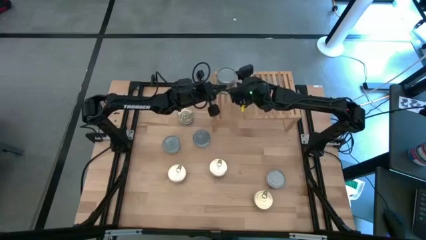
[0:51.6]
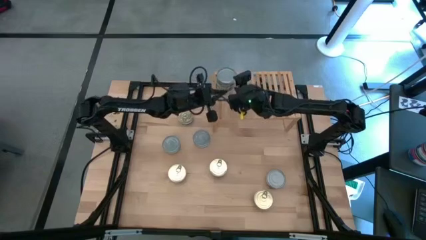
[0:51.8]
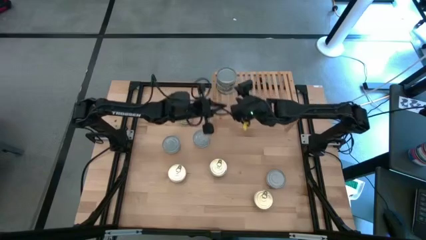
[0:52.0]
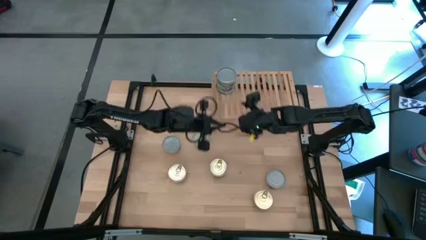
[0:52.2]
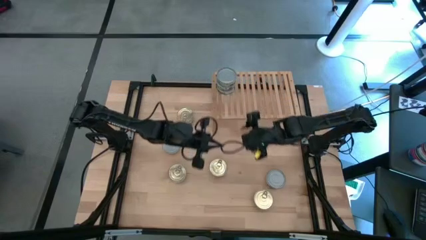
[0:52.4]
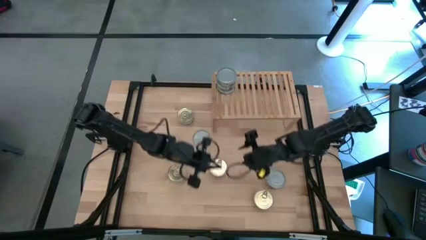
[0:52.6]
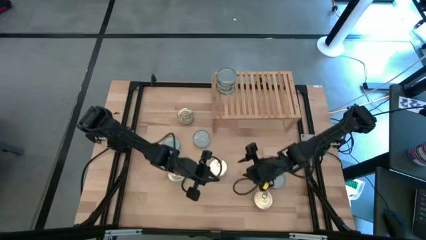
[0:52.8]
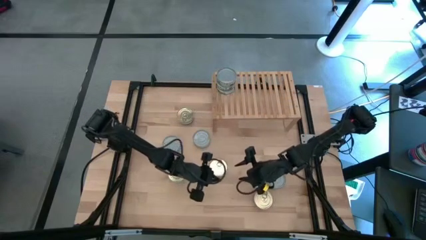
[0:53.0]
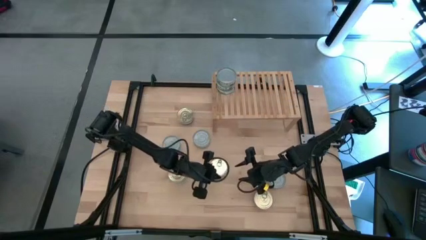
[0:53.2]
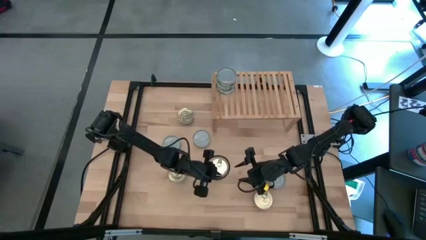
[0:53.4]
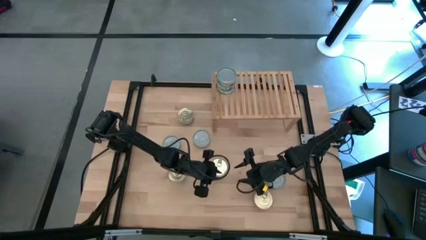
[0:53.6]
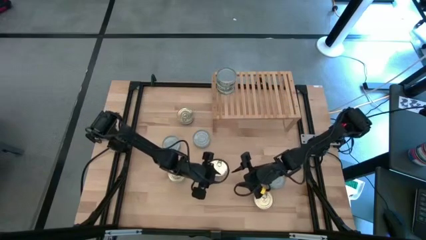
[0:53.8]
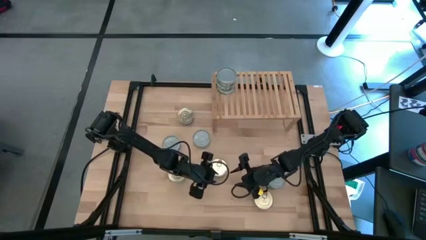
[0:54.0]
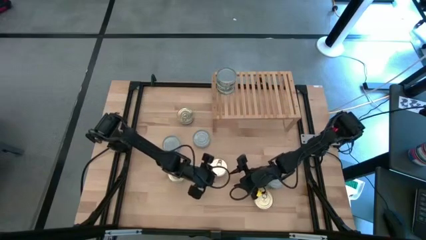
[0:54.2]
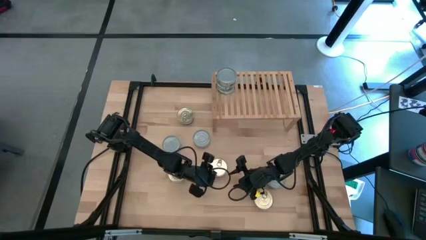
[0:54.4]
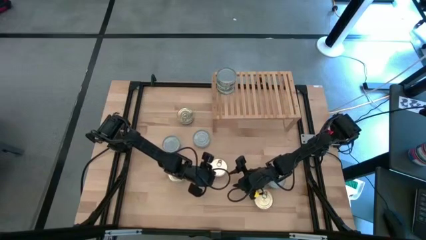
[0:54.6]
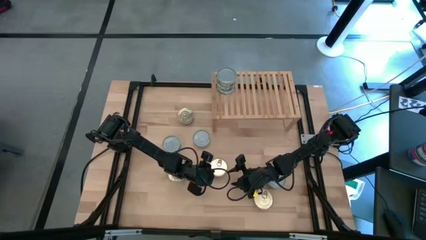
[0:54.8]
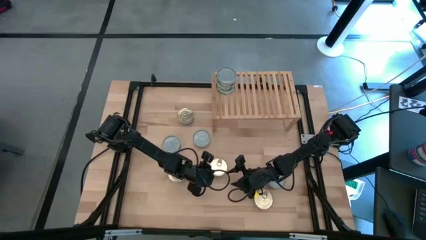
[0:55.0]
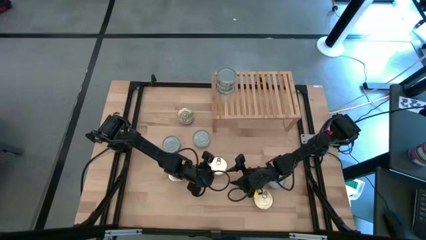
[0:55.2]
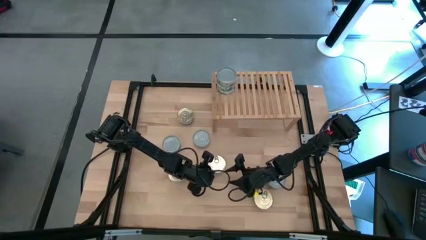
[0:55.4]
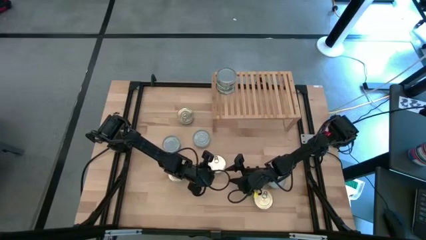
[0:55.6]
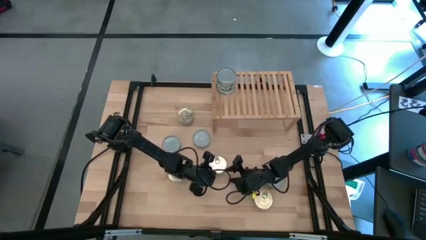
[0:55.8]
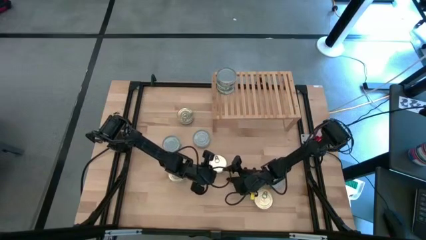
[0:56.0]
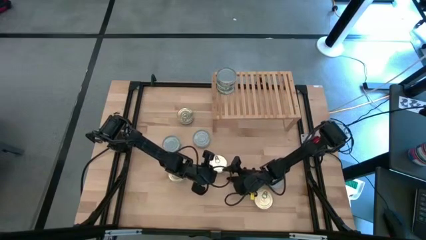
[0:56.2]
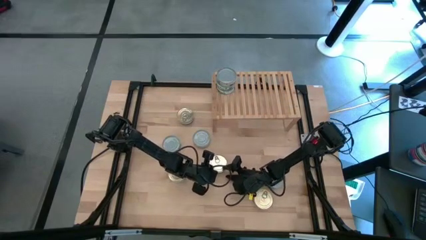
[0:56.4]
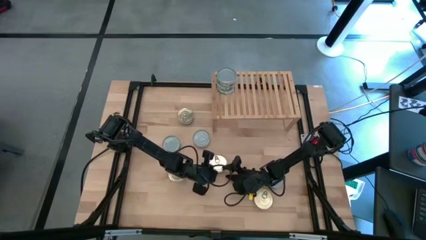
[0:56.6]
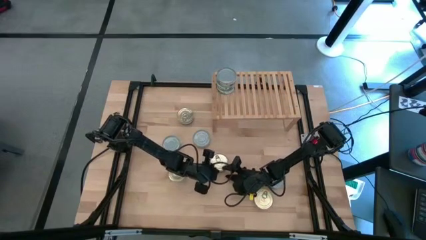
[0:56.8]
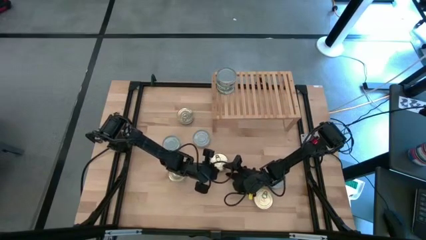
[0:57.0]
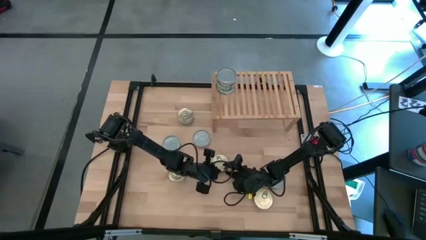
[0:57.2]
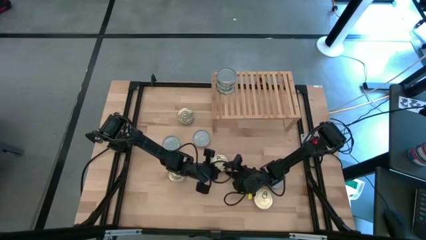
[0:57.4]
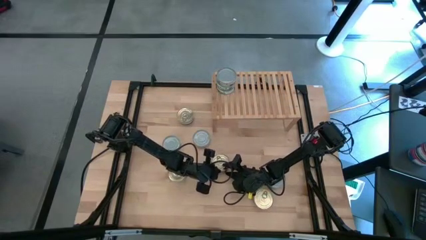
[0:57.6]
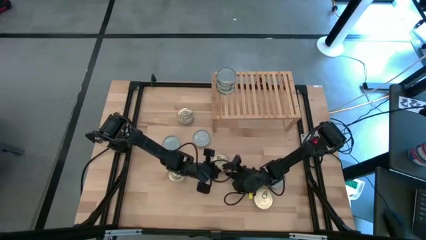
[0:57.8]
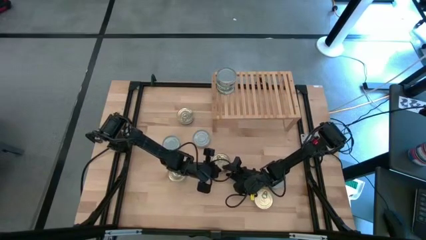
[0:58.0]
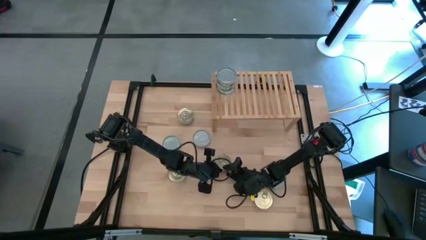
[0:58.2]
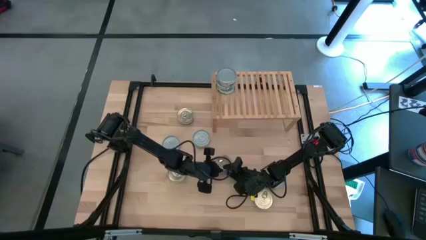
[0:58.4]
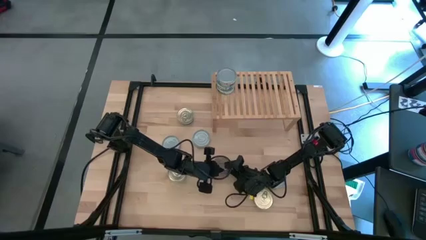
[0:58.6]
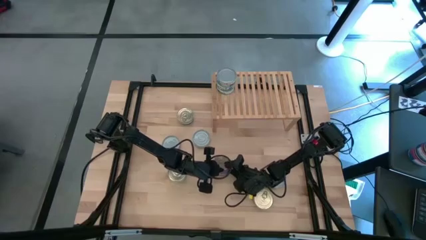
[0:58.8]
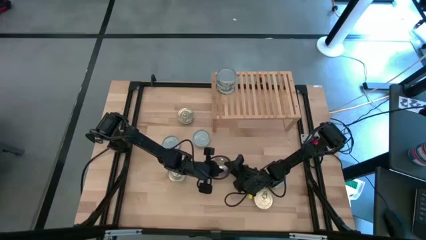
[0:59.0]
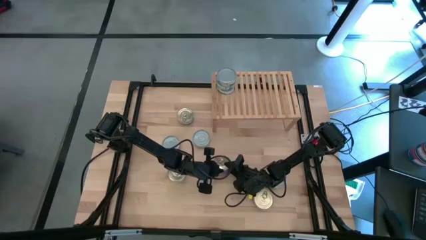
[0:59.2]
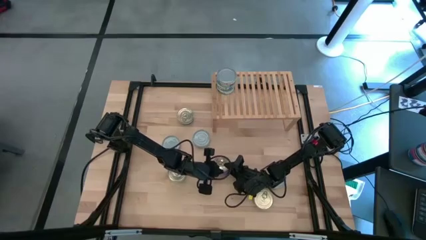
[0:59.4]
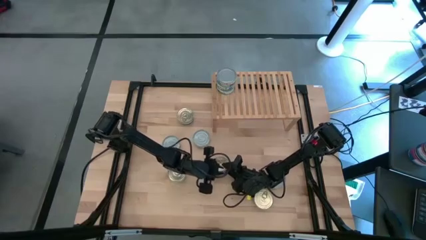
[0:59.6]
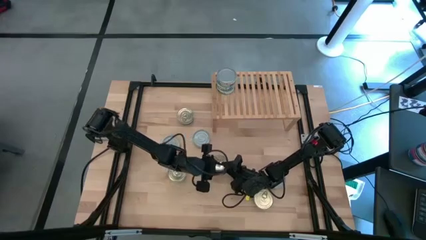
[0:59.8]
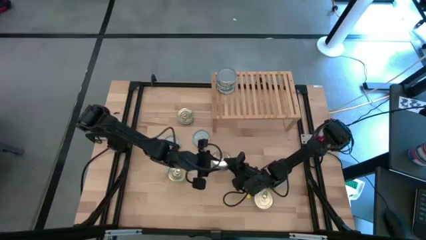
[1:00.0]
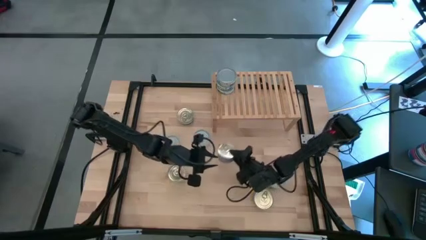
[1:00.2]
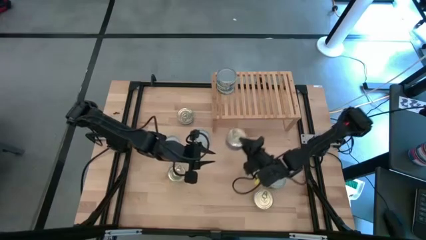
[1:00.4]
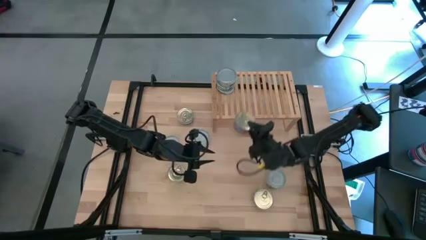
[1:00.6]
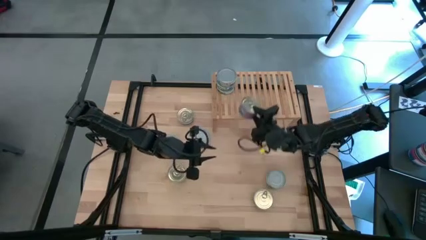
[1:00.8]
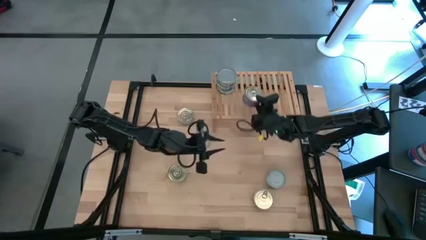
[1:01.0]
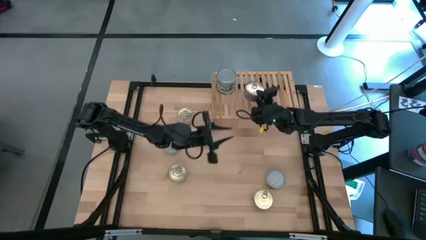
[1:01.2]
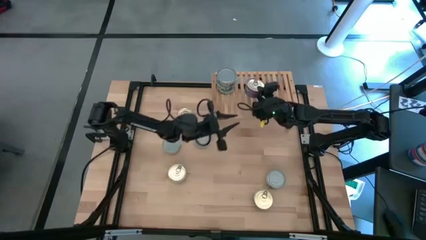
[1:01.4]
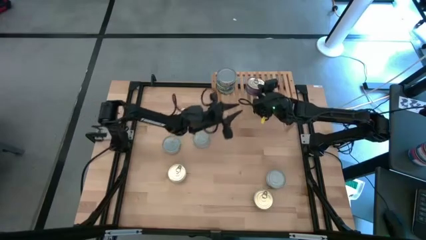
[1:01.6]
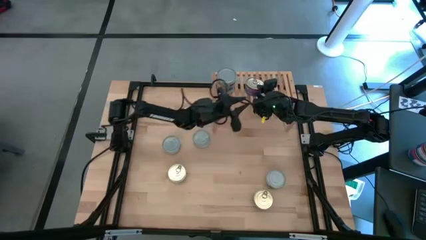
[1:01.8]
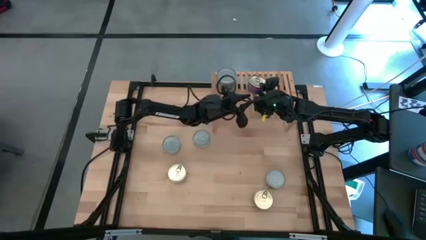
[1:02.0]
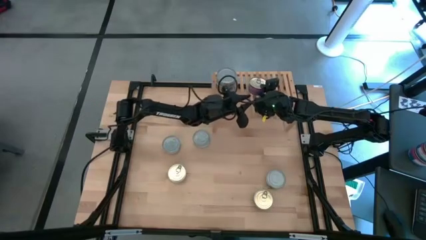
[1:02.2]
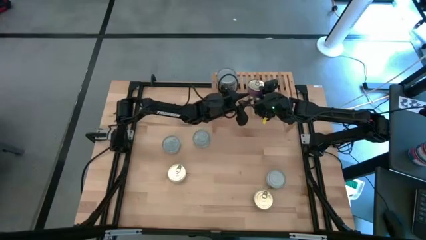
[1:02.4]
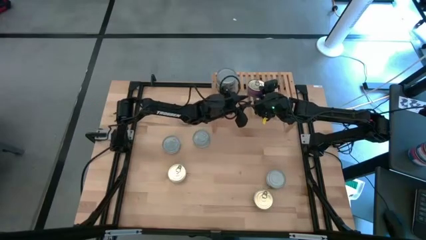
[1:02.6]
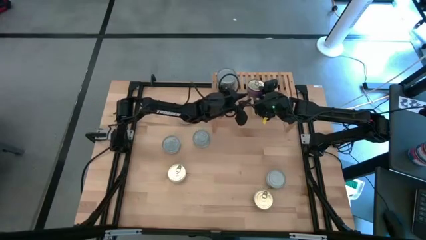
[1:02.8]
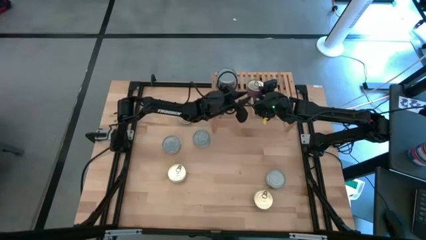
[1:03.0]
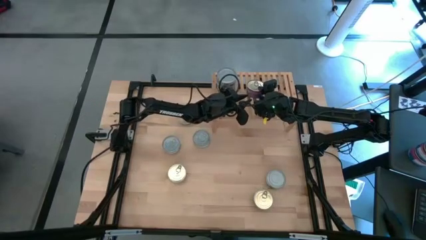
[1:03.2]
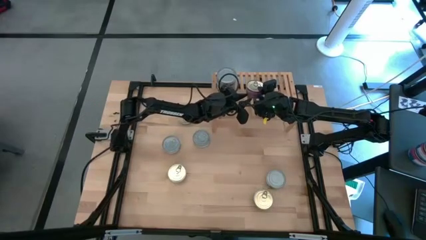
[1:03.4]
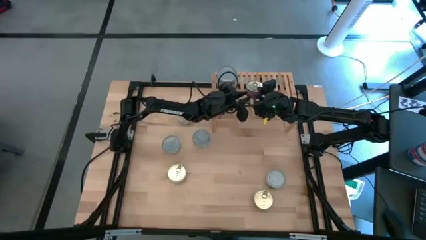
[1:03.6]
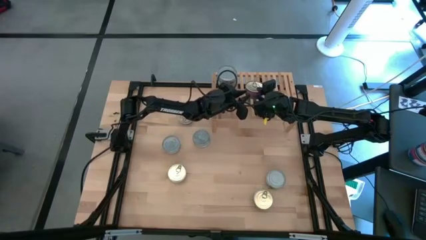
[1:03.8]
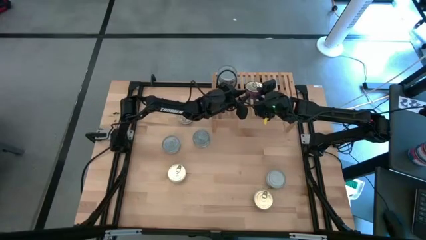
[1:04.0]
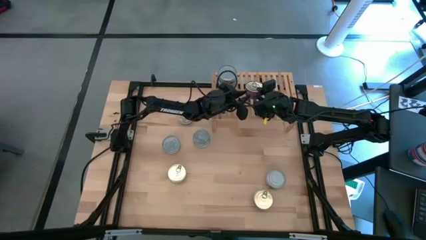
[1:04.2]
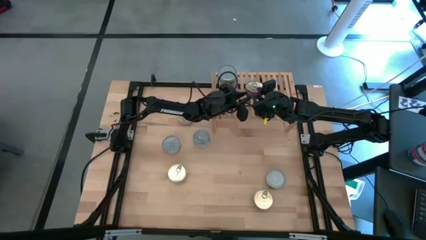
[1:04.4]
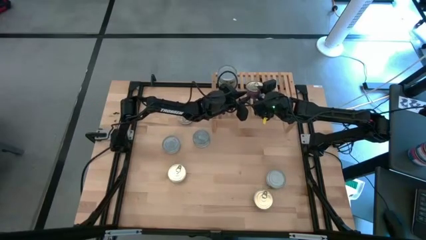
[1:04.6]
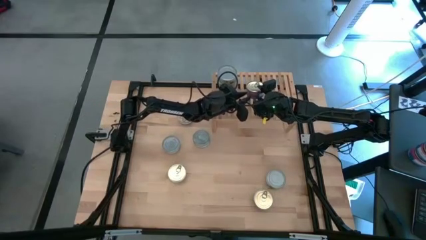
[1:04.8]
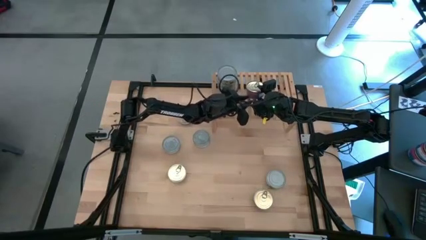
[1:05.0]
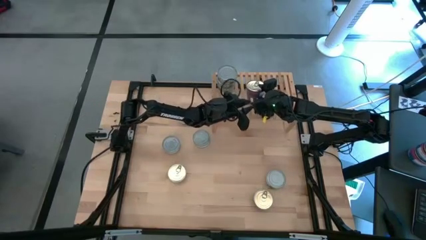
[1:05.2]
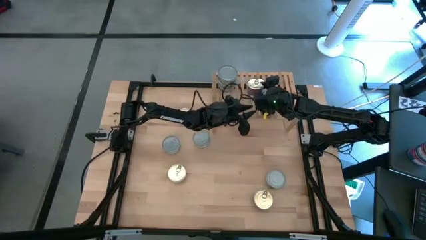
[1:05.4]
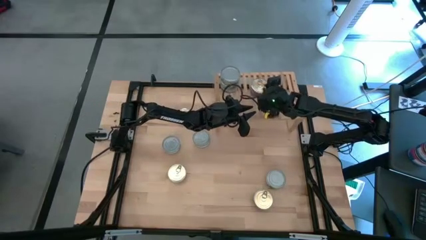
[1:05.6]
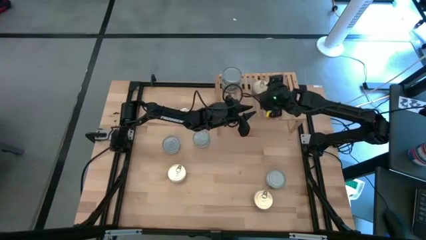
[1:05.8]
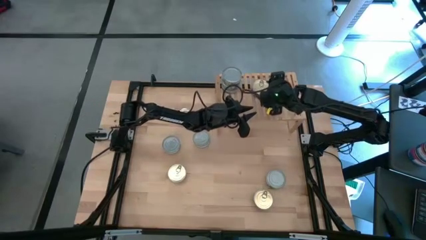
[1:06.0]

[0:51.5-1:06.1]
Task: Stack canned seafood by type on shelf
Put the blue pink tuna can on the shelf
